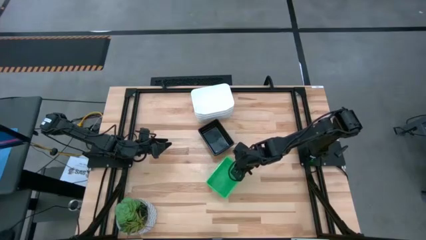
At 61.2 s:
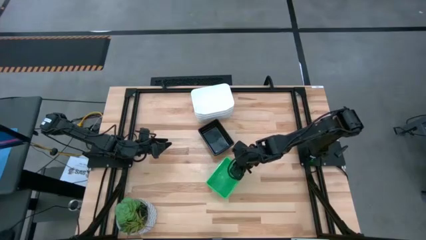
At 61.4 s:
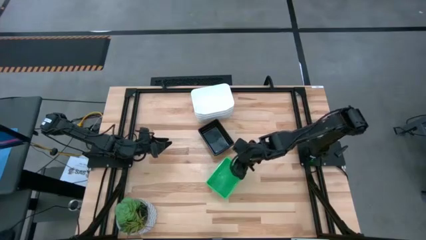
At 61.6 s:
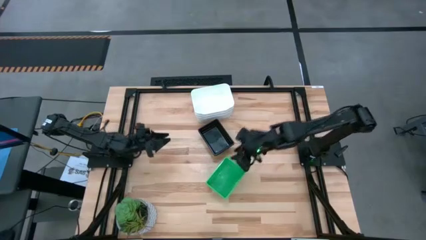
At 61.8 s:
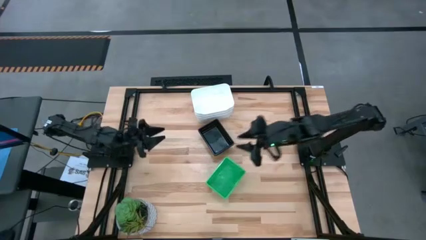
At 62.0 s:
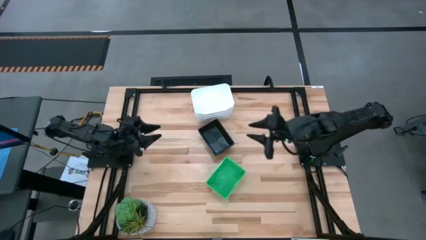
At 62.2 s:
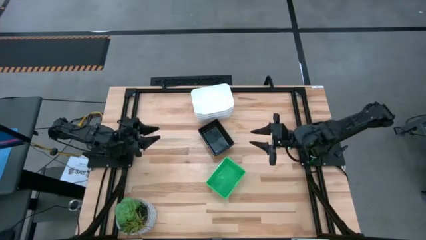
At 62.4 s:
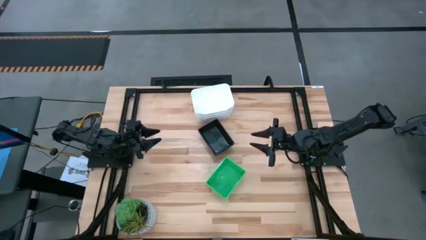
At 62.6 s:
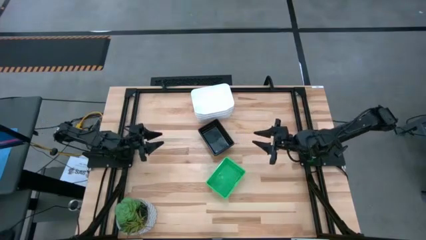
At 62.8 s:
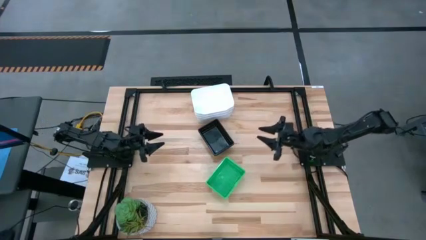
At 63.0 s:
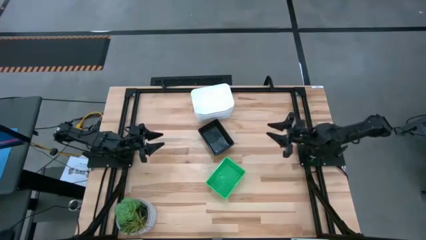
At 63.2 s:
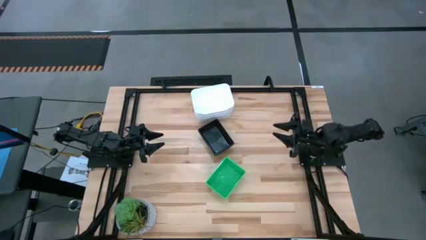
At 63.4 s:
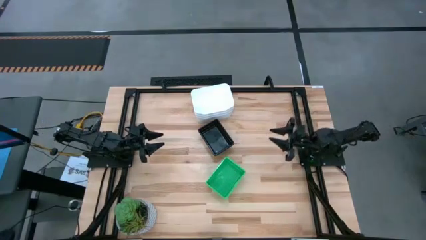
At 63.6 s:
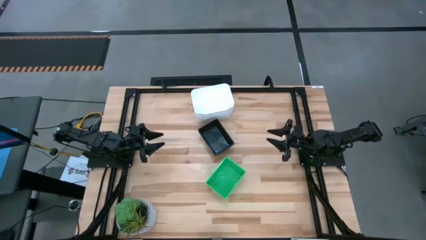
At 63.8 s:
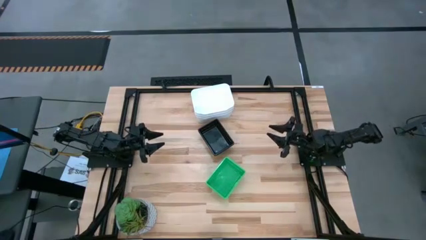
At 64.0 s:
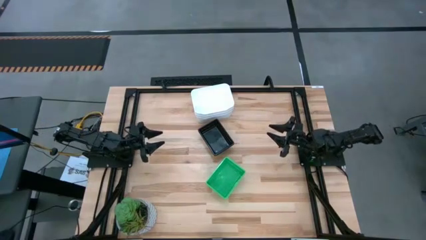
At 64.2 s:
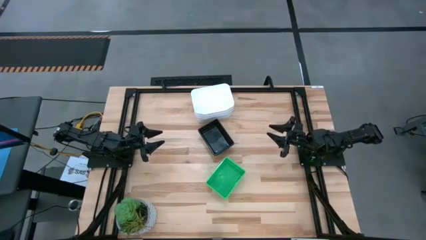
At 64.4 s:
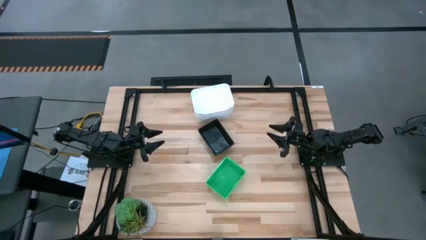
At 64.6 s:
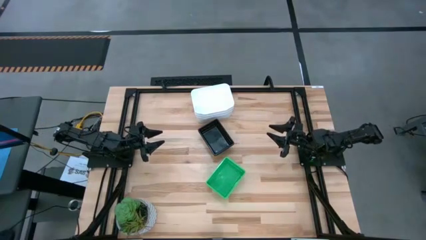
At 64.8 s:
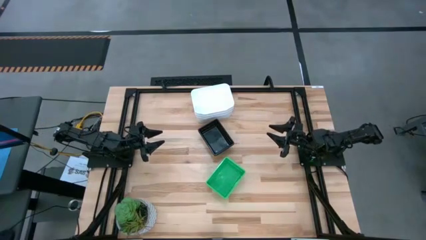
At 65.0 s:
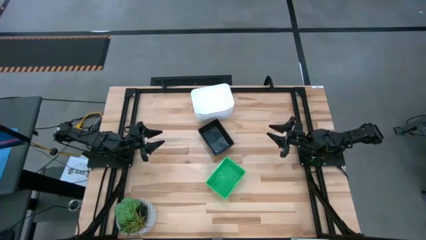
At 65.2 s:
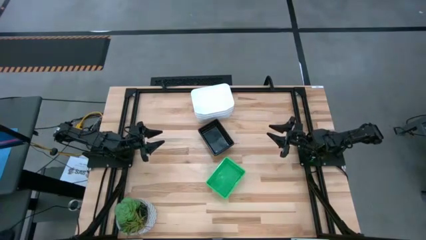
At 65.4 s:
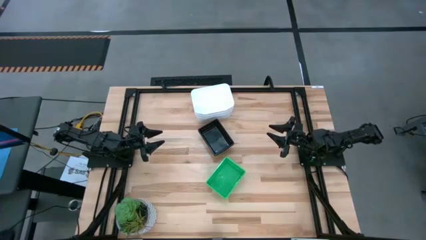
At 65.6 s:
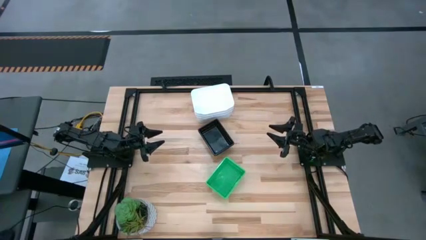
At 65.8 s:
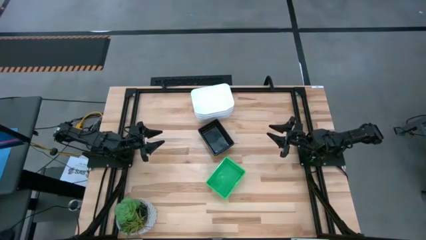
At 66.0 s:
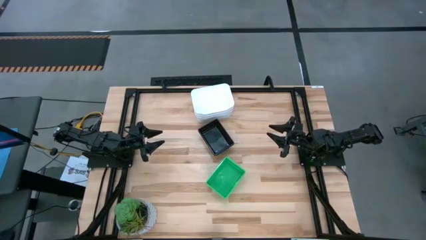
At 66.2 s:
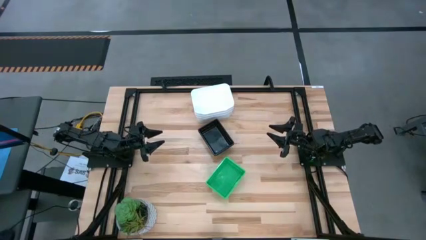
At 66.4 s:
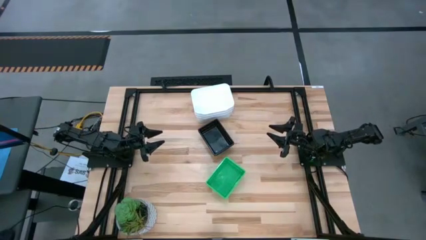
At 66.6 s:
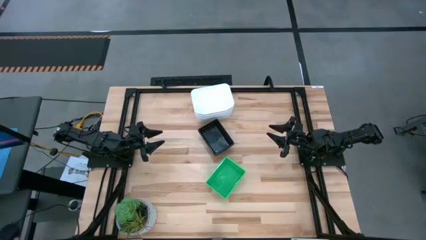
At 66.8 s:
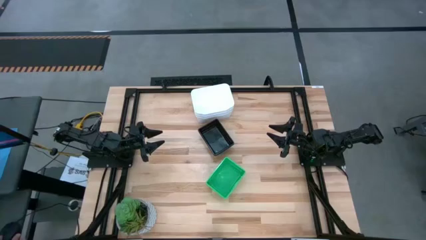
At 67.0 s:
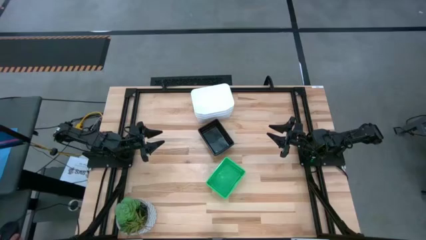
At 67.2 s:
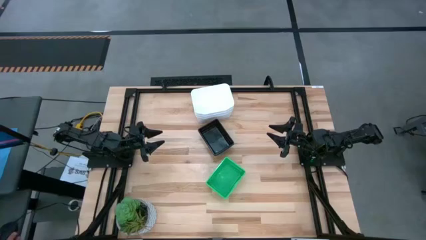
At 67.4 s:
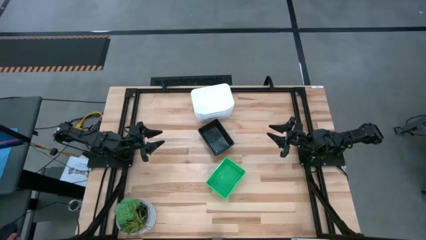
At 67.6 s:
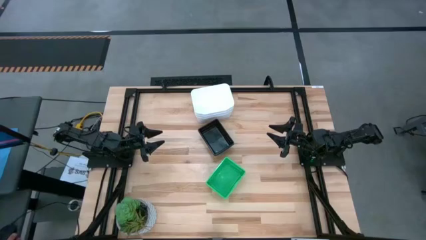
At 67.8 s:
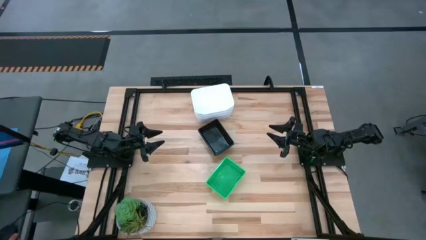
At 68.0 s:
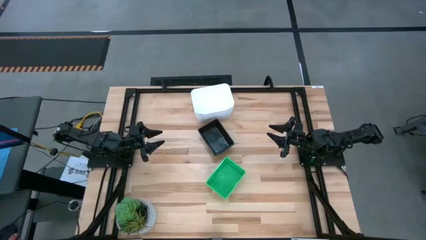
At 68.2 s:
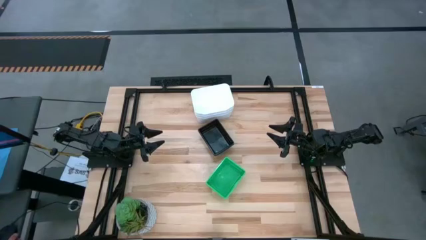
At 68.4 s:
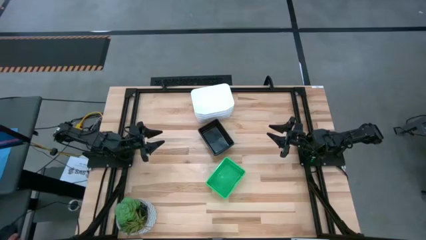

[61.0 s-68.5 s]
Return to Home Position

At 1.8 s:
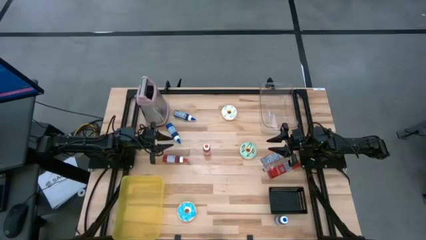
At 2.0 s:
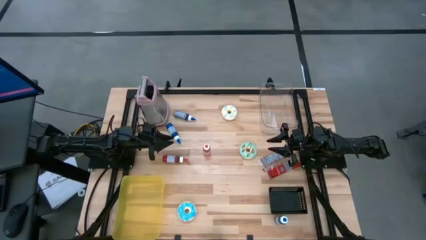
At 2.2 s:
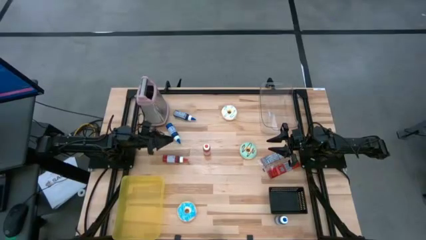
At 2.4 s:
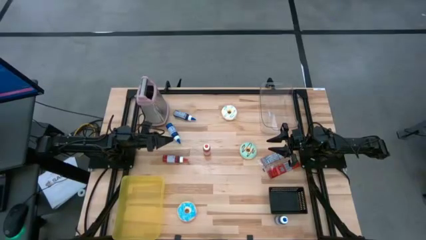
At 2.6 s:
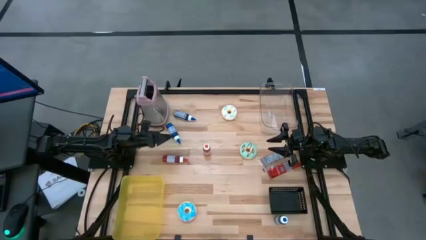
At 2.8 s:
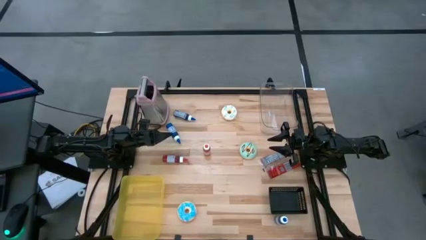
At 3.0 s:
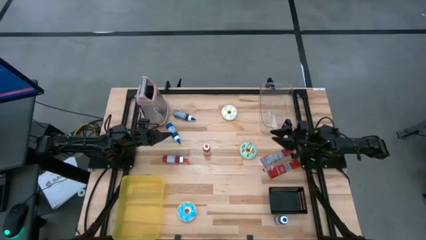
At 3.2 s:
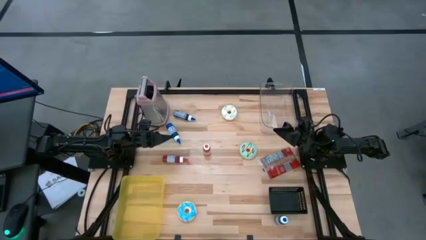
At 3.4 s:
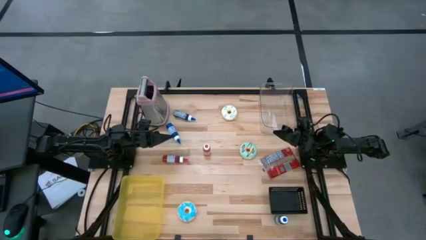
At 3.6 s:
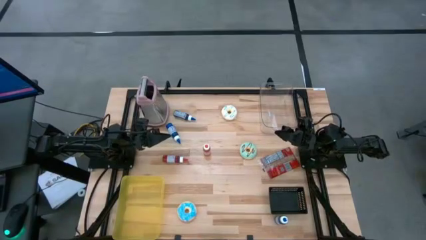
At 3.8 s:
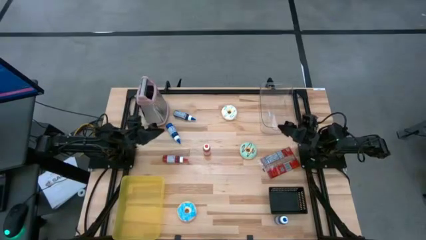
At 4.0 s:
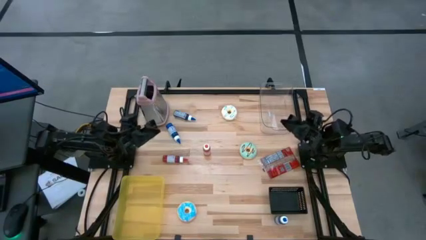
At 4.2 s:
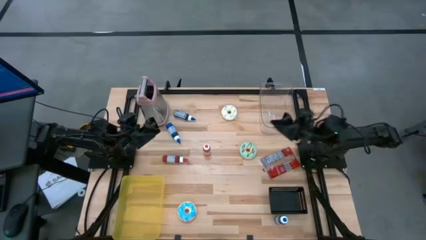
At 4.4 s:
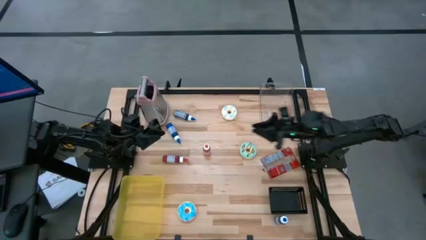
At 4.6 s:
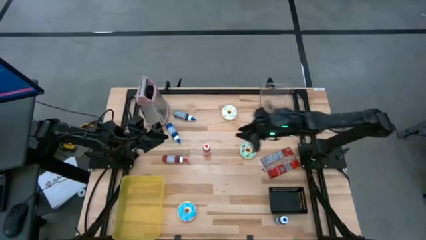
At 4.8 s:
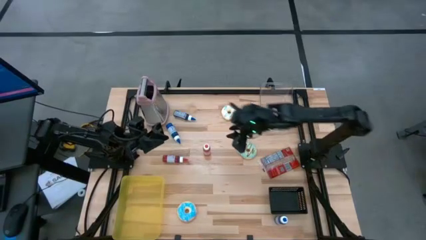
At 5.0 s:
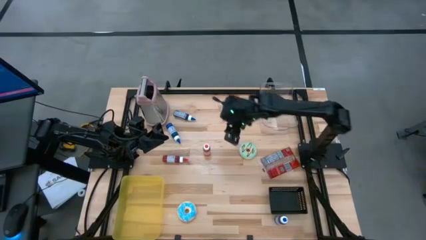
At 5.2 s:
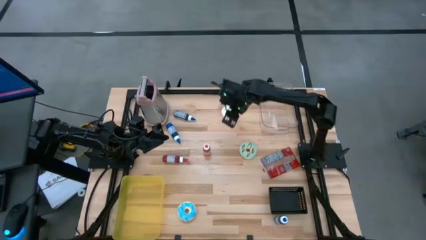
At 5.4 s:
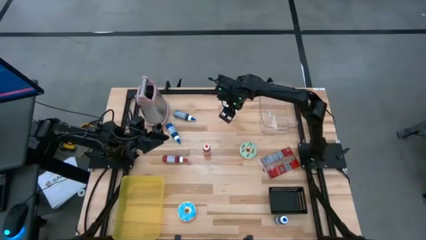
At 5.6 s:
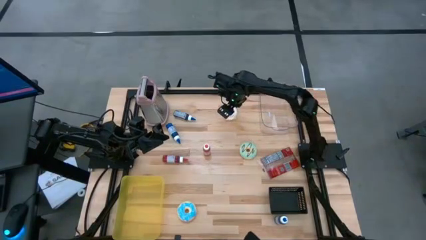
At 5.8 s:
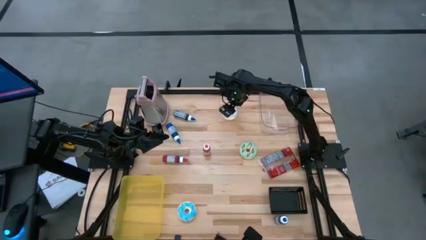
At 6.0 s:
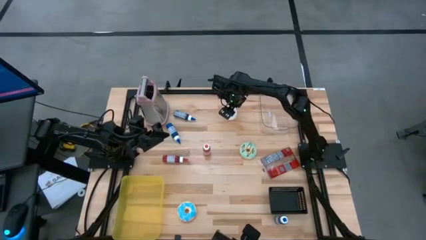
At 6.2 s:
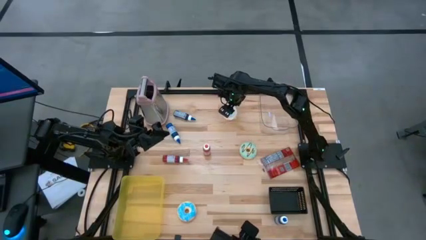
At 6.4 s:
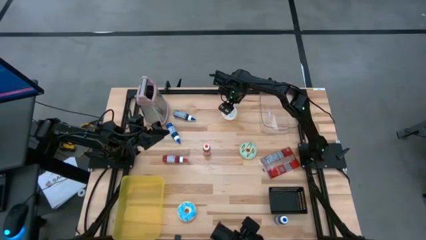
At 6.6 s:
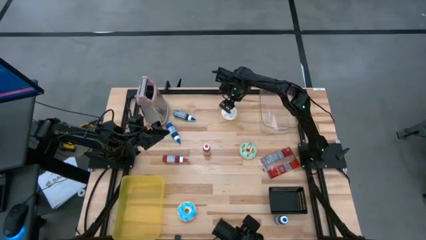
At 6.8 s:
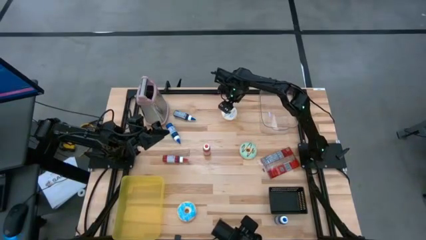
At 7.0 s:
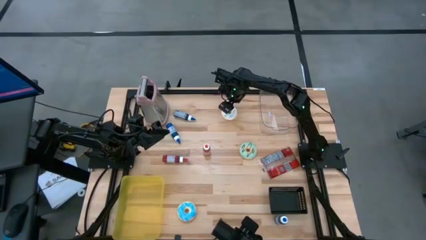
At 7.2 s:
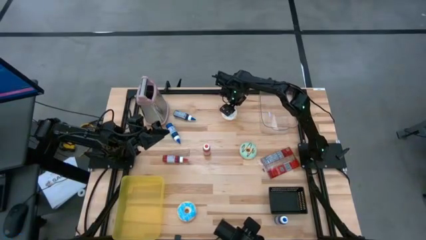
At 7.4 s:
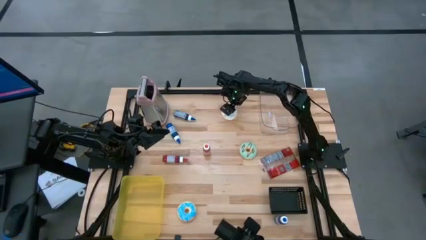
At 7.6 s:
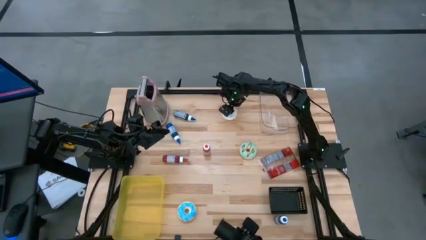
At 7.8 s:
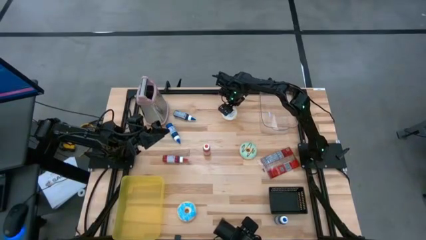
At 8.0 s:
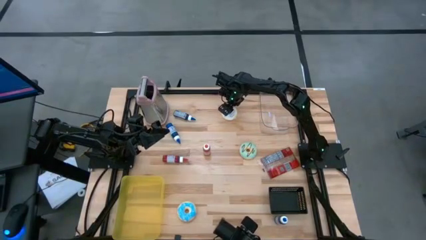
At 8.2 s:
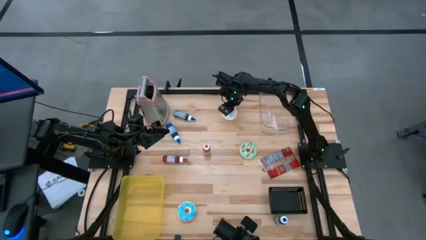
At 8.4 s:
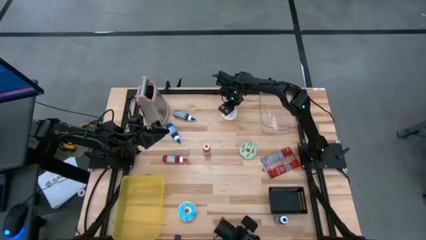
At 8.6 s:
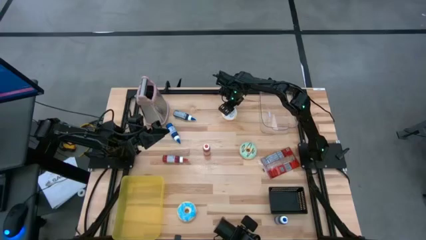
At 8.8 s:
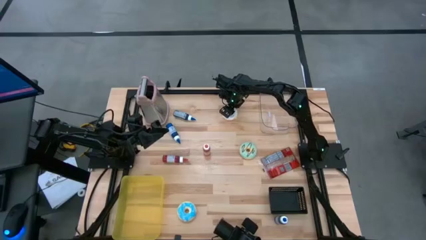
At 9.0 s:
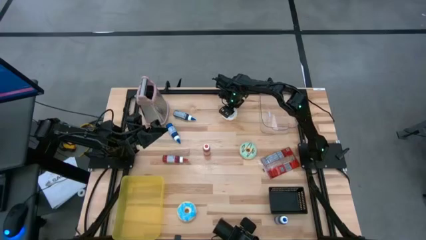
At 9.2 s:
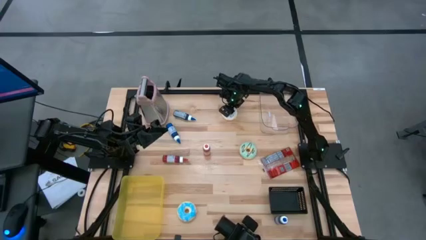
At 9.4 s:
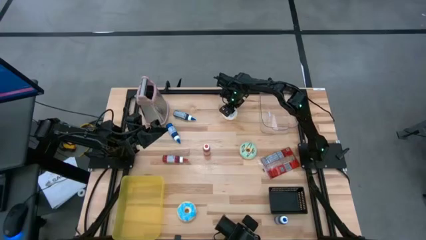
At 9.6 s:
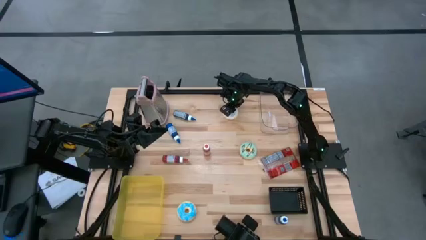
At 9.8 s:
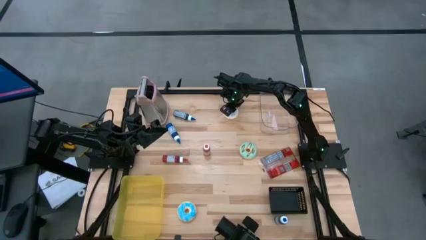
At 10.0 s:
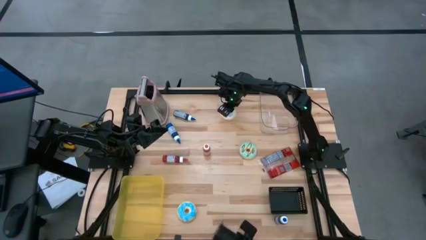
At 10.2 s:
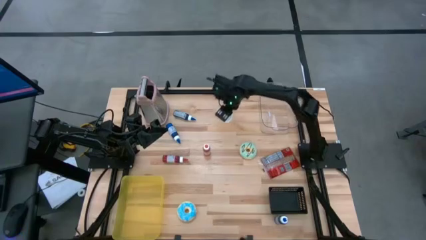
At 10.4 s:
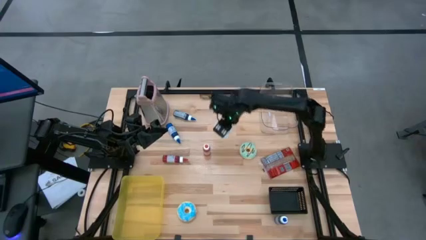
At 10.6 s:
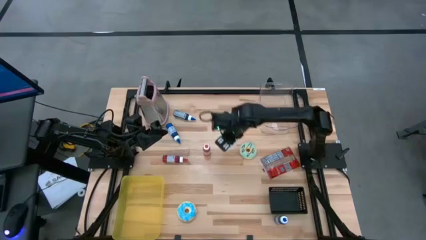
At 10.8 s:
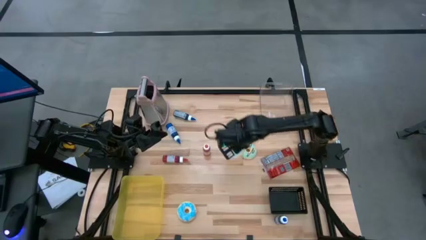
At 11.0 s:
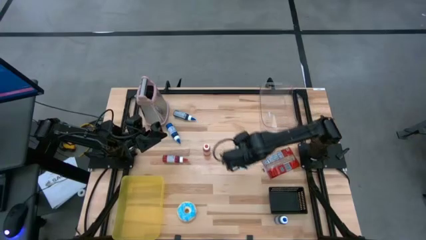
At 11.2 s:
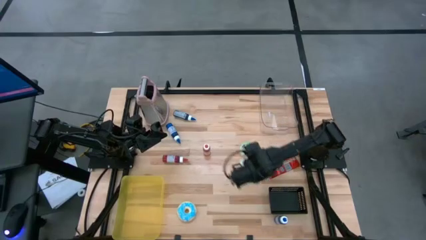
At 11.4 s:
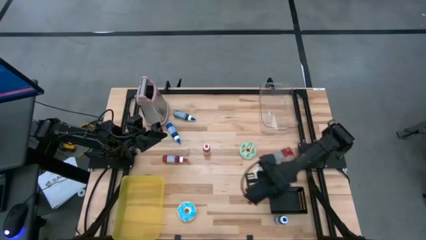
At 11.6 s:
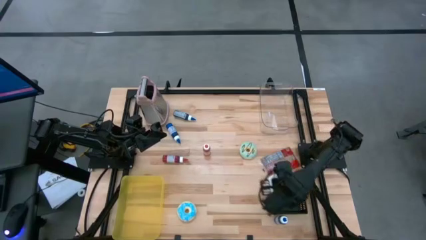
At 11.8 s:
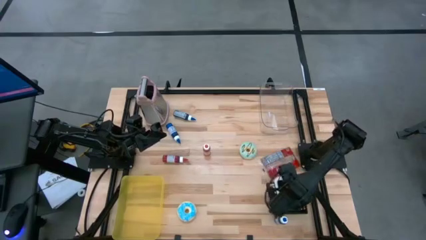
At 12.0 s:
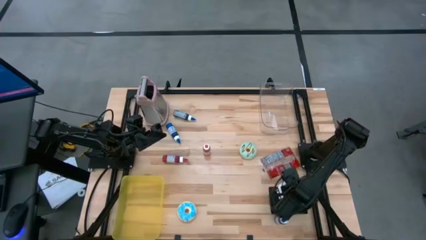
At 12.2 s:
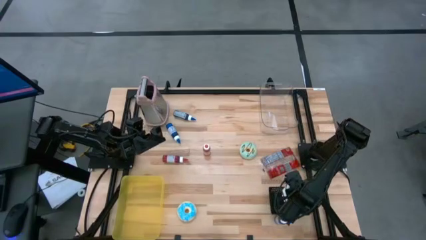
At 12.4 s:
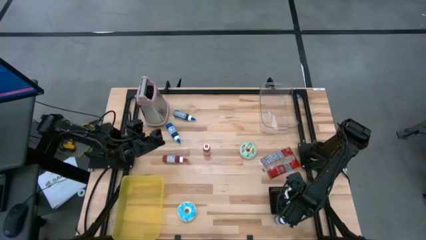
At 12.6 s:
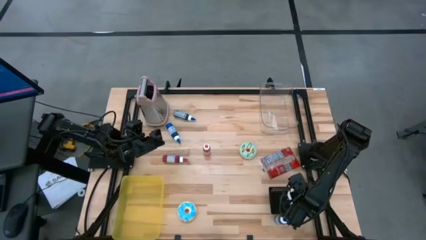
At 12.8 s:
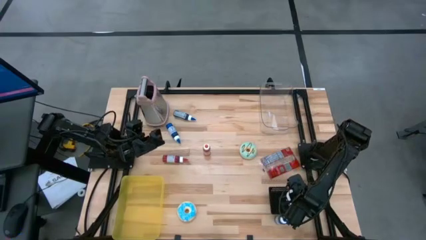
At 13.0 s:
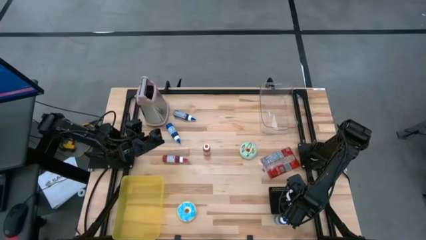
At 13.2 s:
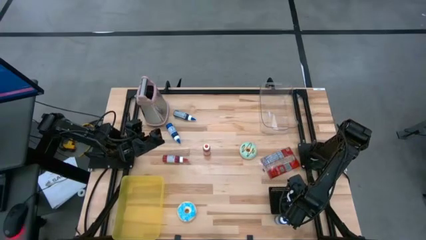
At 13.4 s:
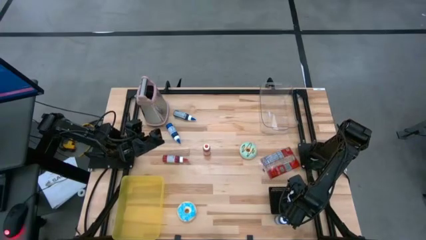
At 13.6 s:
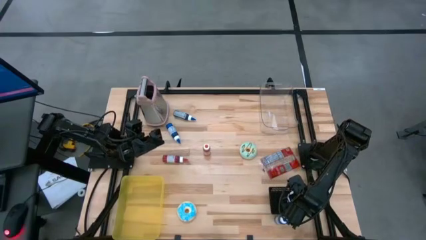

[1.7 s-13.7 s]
Put the white donut into the black bin
